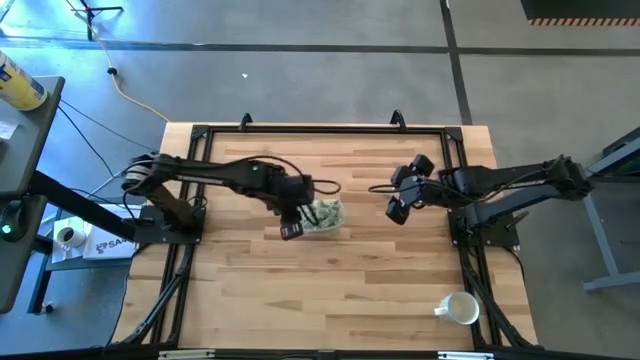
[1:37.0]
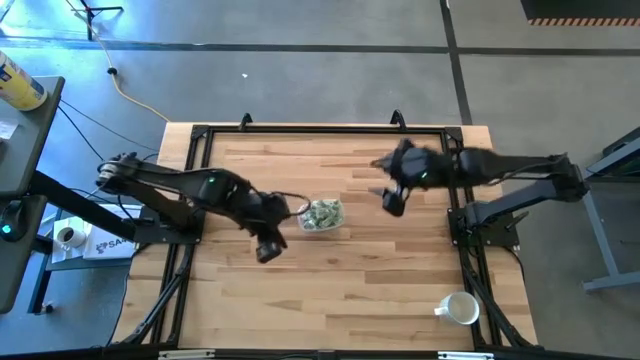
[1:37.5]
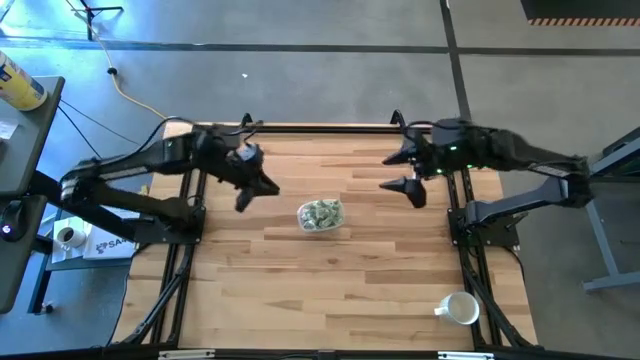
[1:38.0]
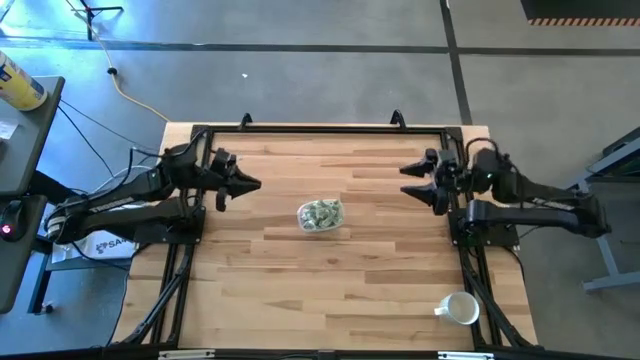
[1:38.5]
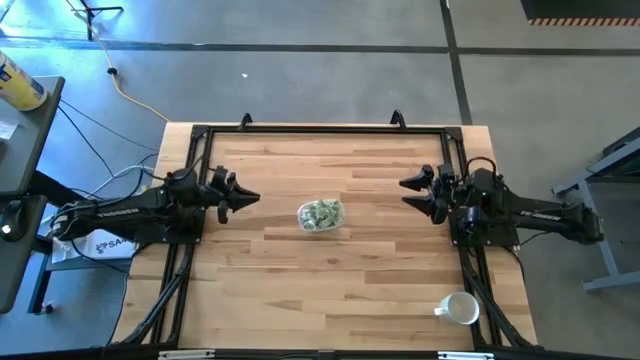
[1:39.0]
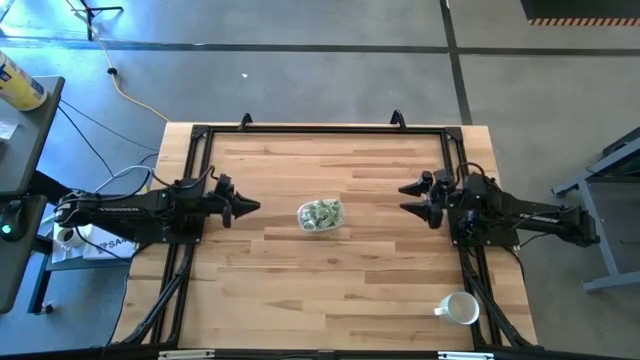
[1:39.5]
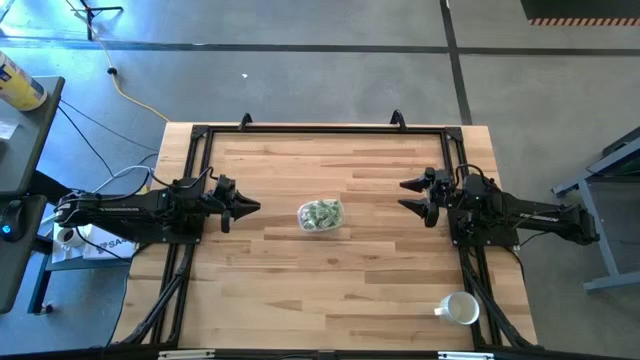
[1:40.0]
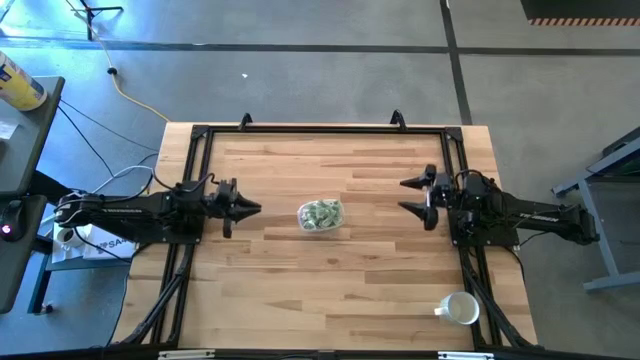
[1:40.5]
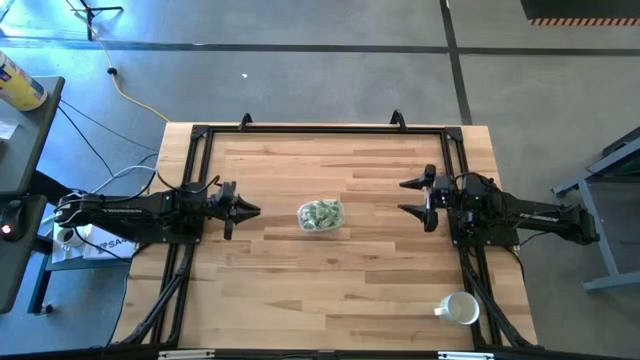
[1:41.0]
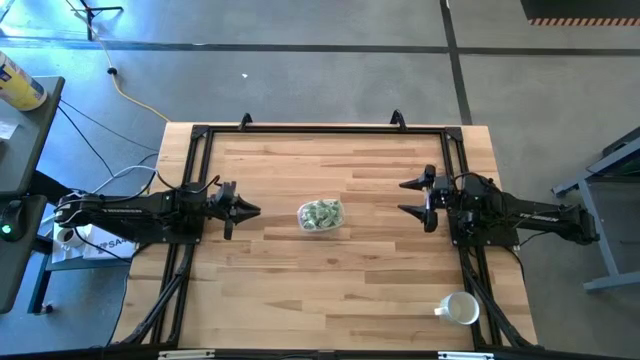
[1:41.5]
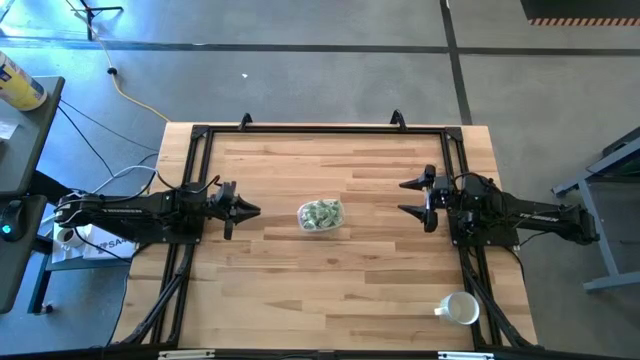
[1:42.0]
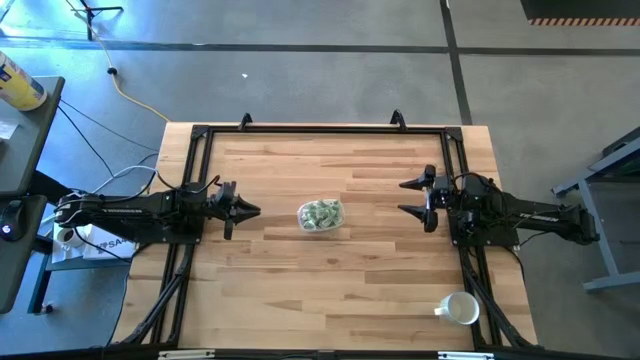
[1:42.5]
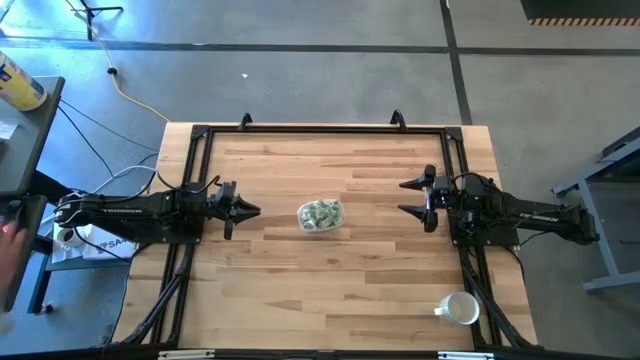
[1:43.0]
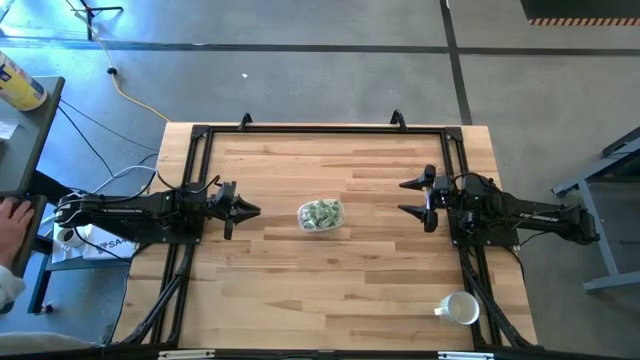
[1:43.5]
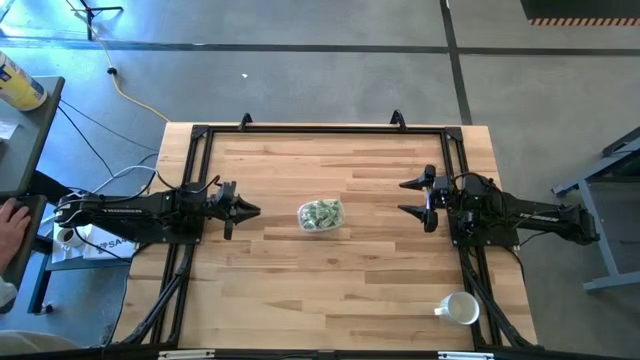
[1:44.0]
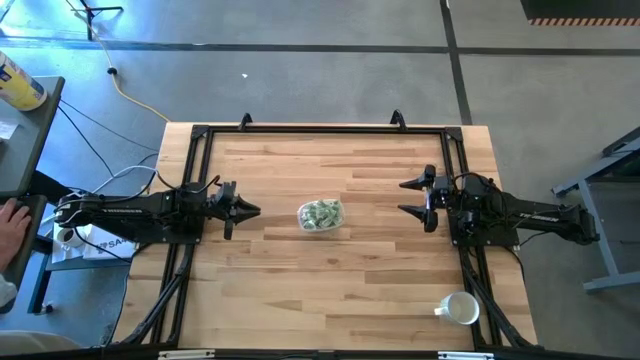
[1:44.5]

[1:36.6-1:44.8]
Task: Pick and place Stevia / Truvia into bins
Return to Home Position

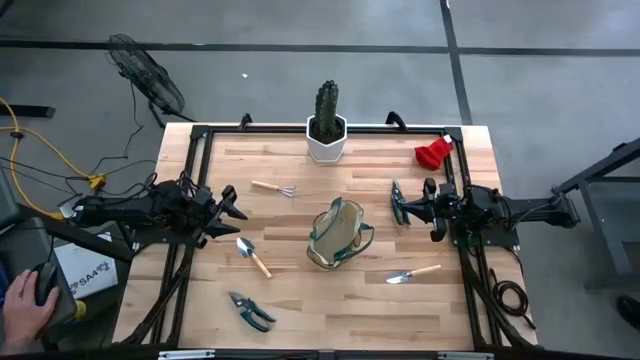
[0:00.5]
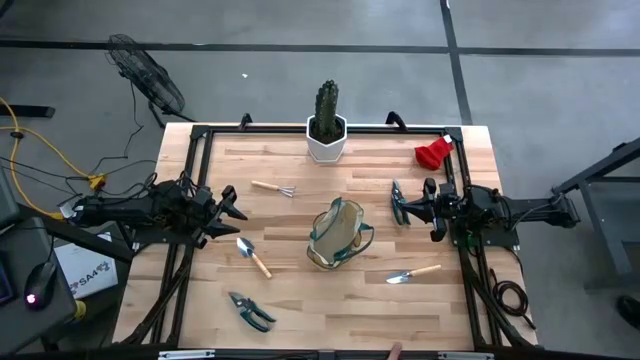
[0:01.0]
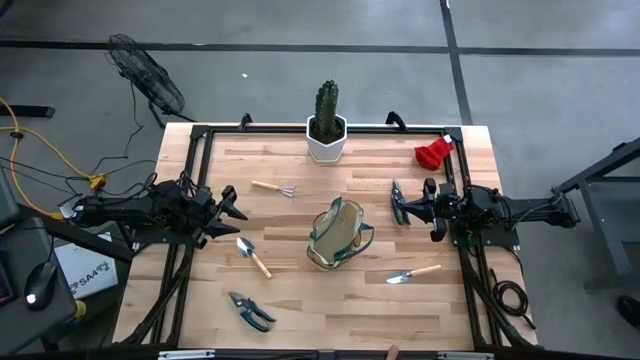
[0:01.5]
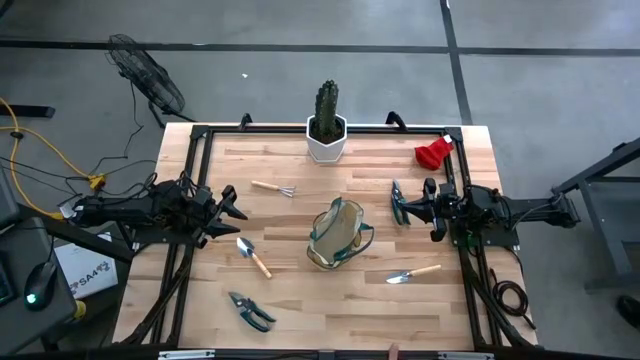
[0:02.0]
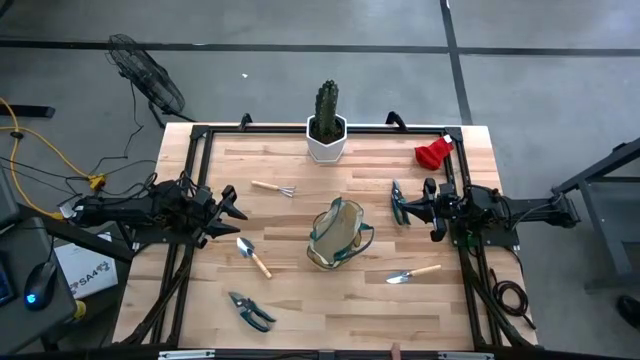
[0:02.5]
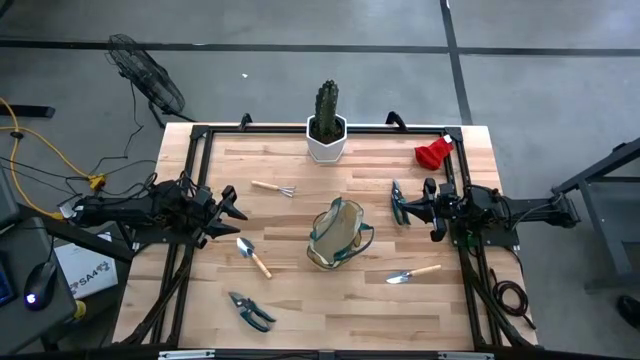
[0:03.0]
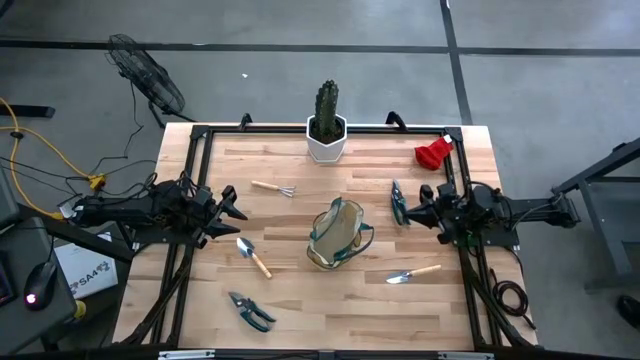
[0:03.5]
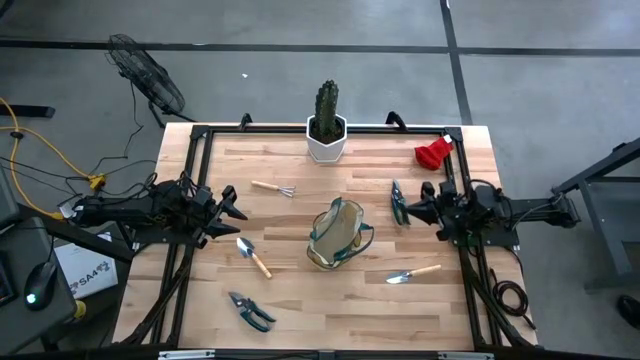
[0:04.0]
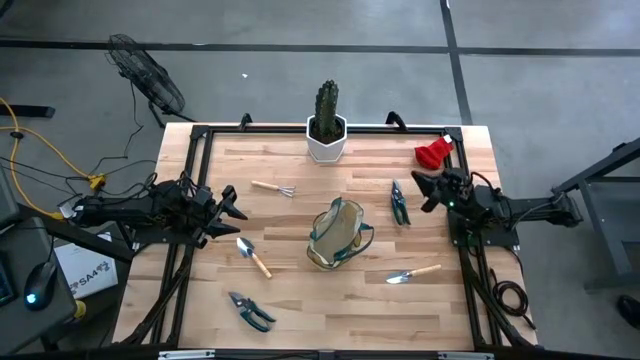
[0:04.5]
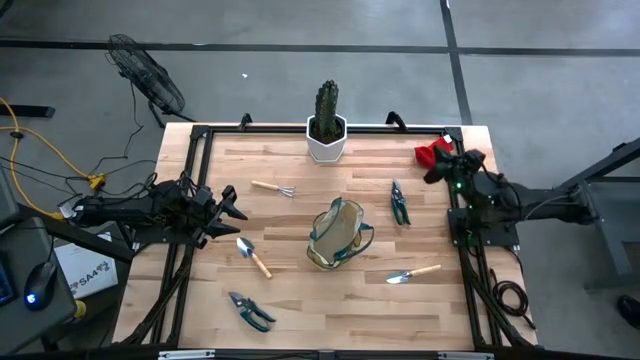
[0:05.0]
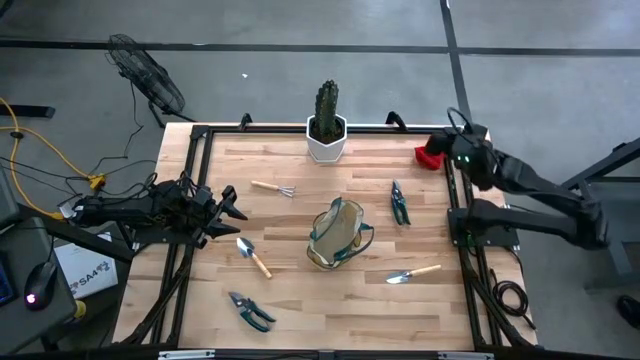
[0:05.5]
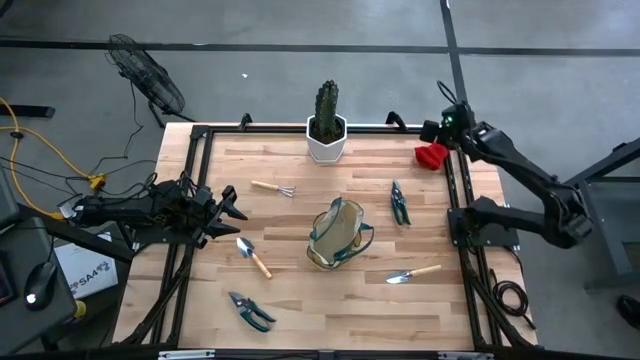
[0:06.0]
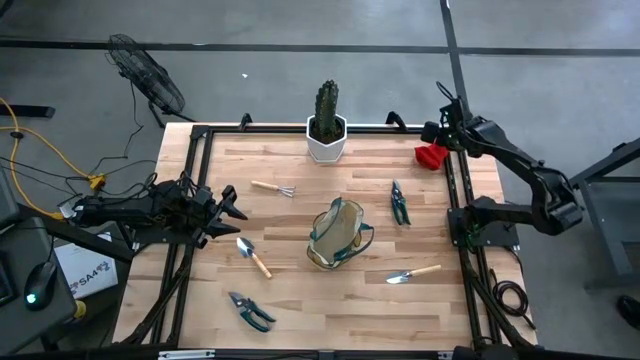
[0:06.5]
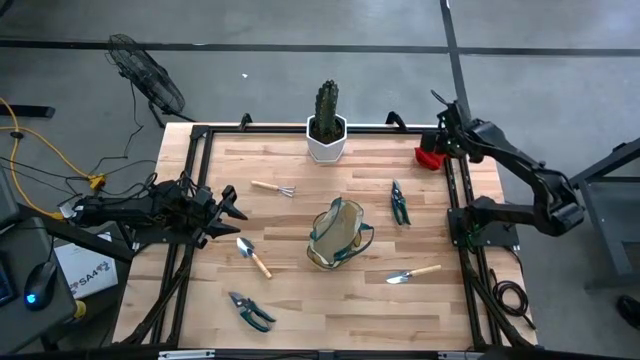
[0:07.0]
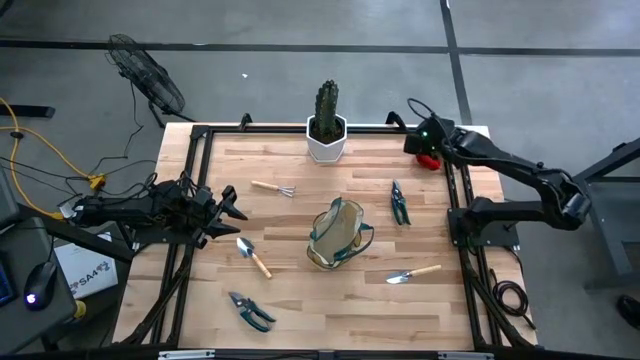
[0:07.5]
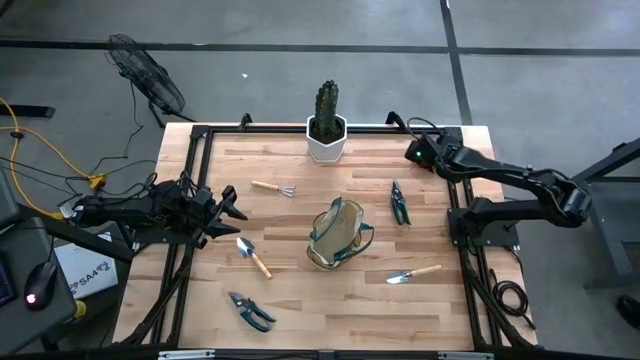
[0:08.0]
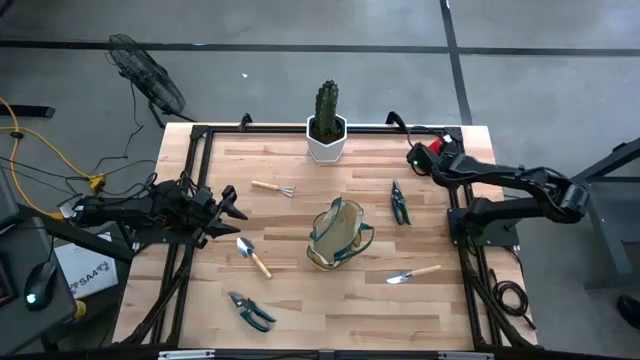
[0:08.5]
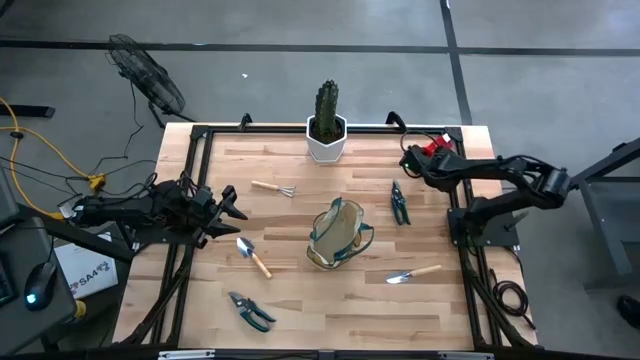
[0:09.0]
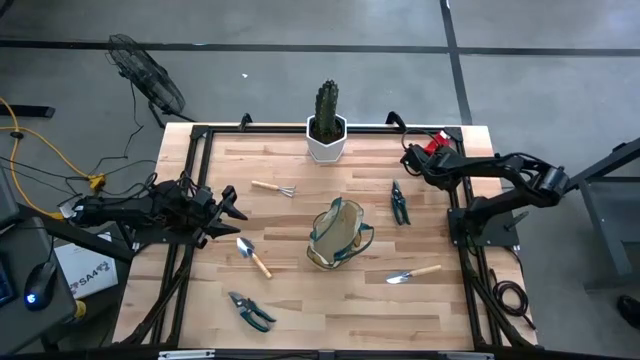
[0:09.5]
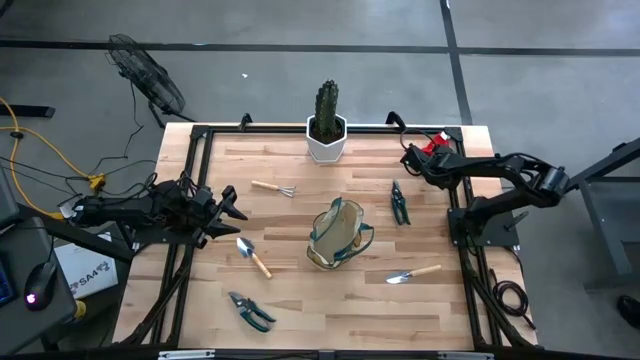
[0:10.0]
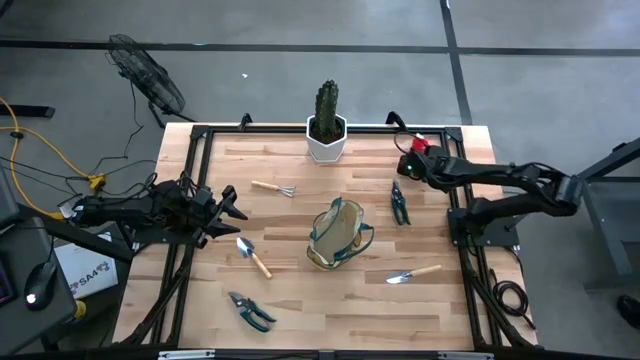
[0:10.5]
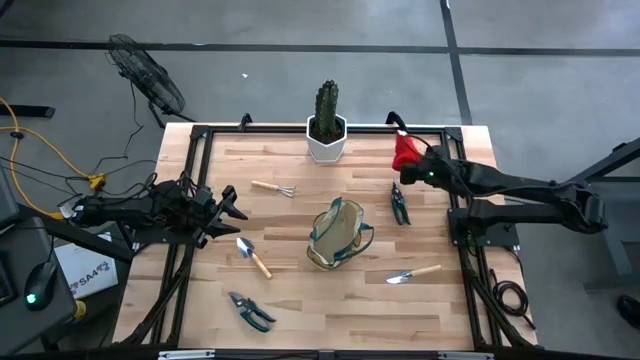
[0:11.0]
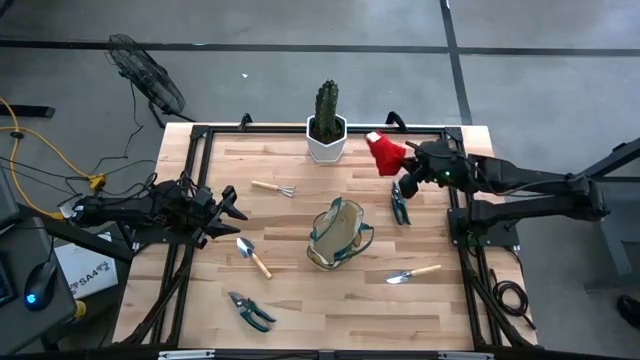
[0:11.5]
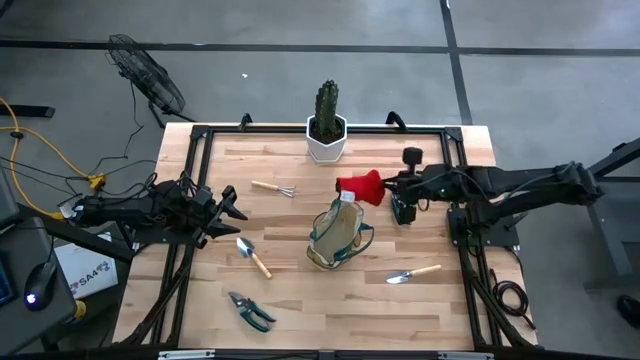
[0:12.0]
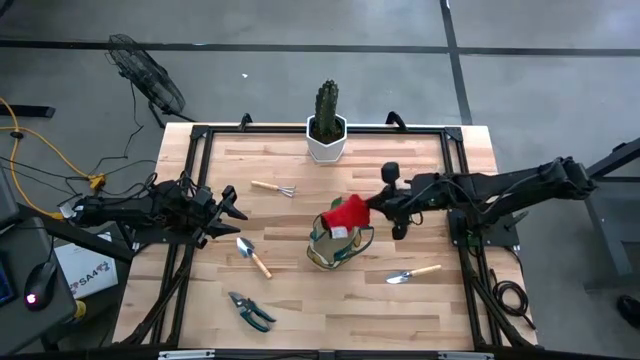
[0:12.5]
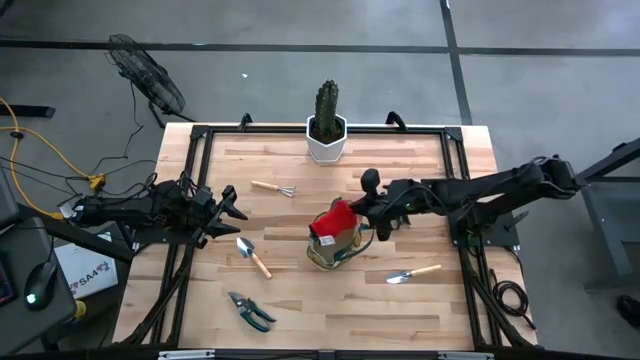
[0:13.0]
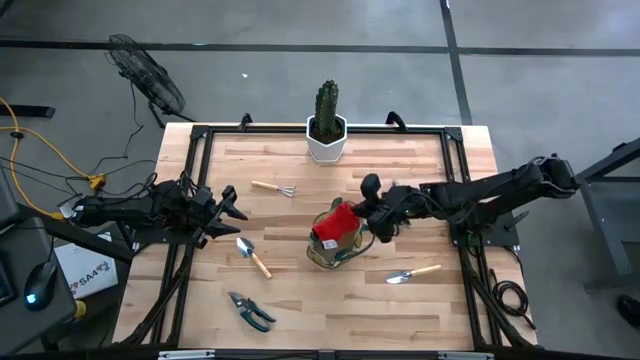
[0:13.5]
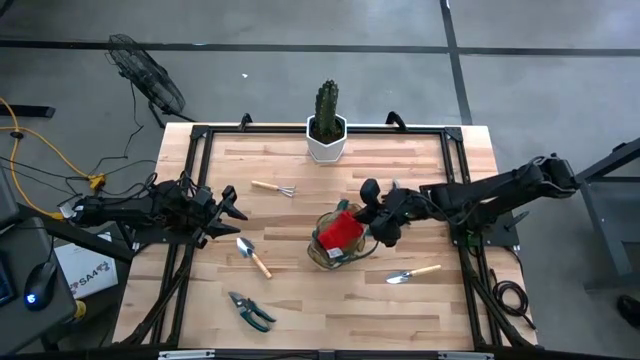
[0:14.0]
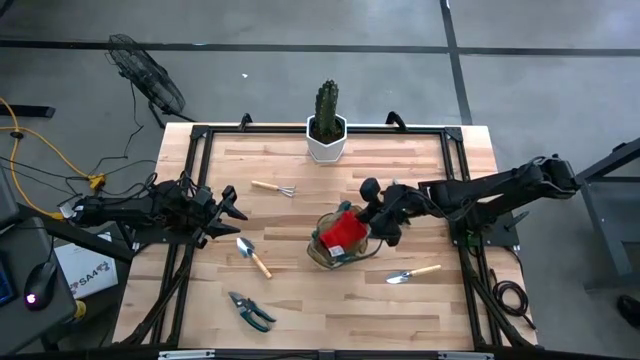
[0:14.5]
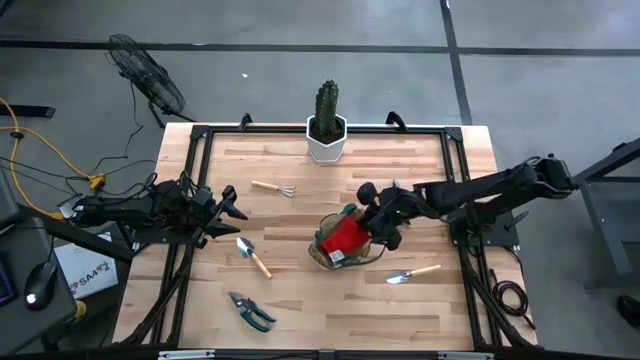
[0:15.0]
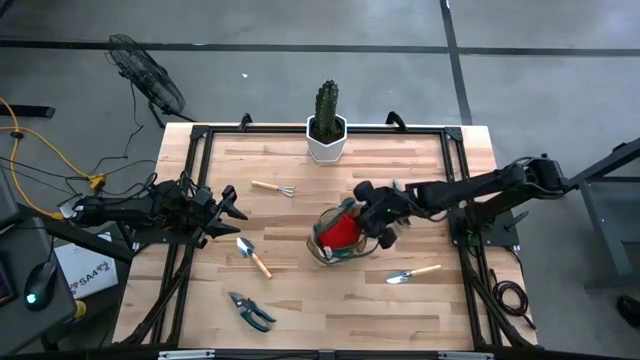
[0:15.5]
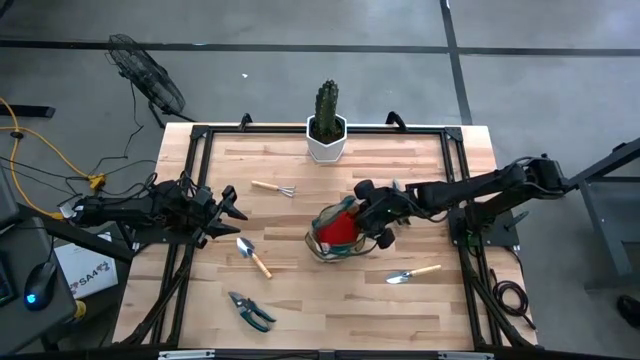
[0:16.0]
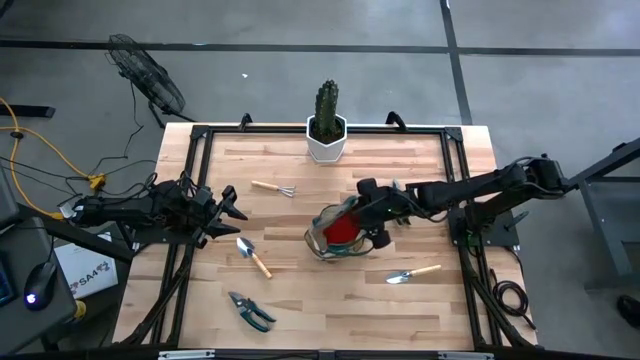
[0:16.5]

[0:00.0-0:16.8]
Task: Pick & Place Garden tools in Gardening bag
Put the red gloves into the brown gardening bag
